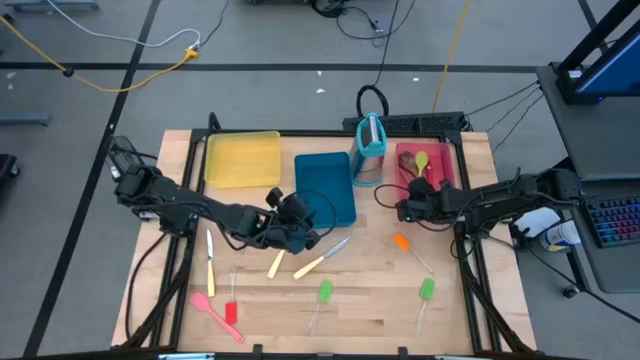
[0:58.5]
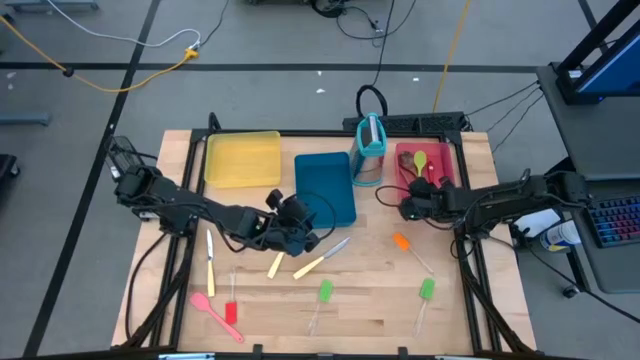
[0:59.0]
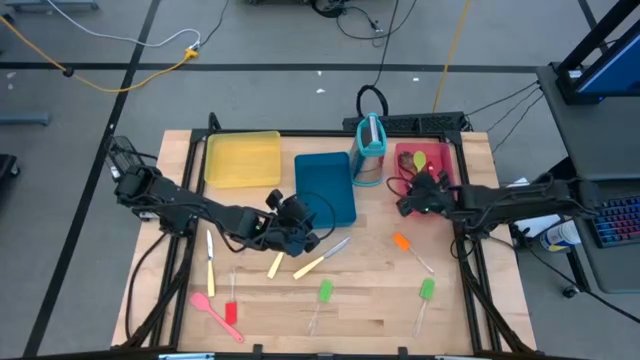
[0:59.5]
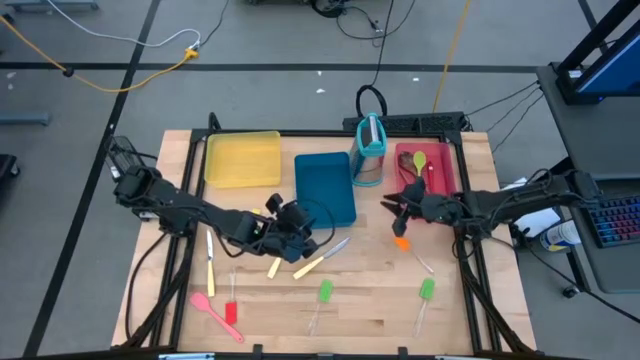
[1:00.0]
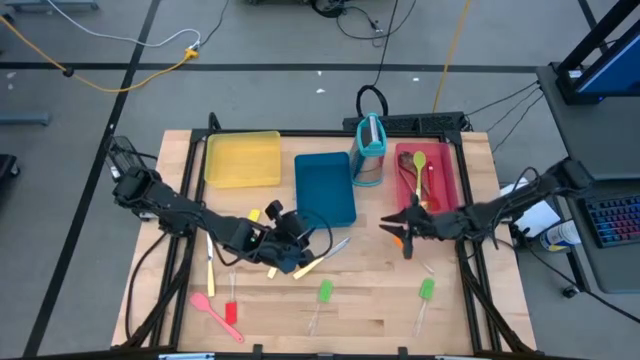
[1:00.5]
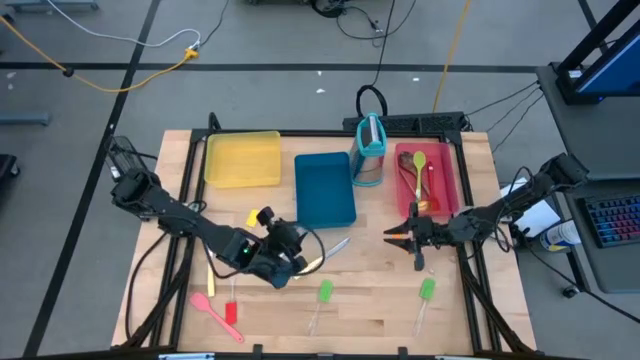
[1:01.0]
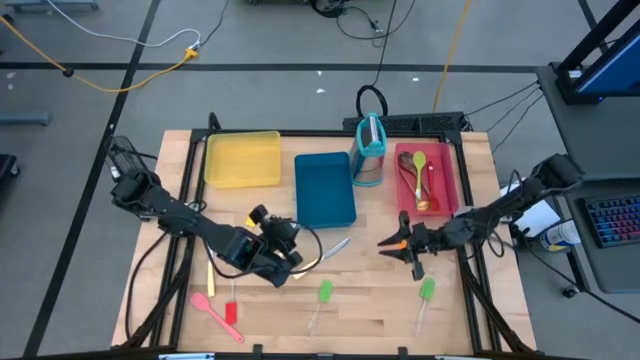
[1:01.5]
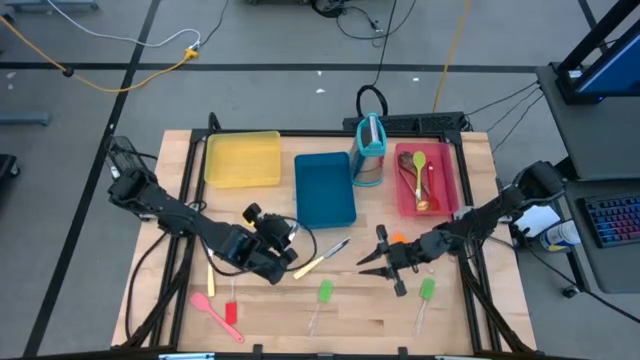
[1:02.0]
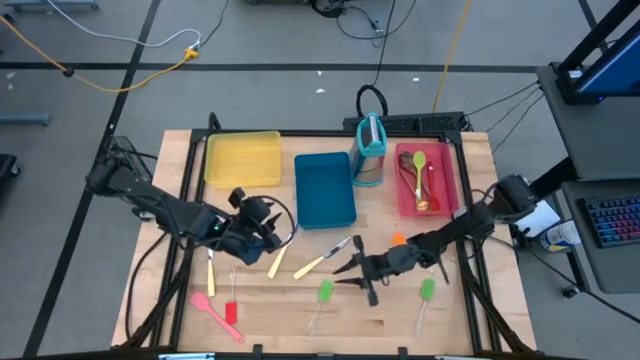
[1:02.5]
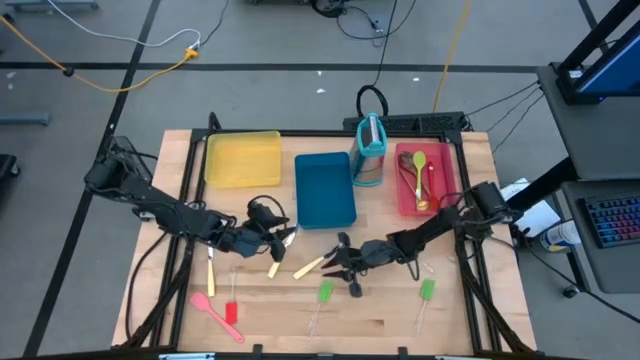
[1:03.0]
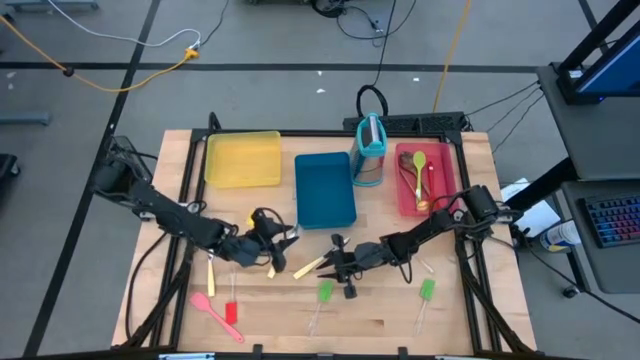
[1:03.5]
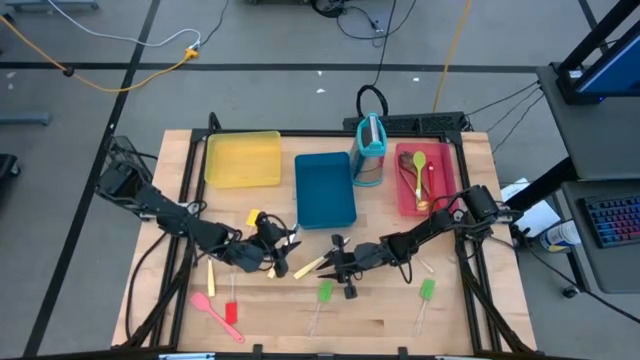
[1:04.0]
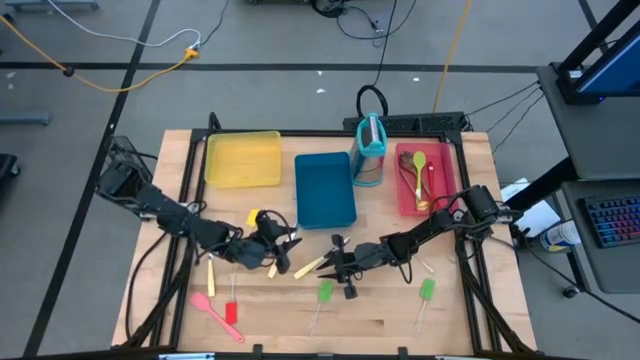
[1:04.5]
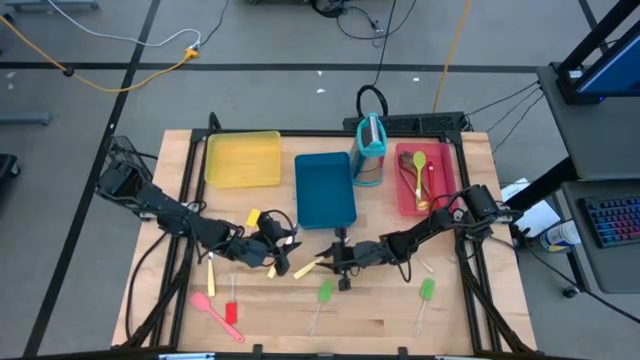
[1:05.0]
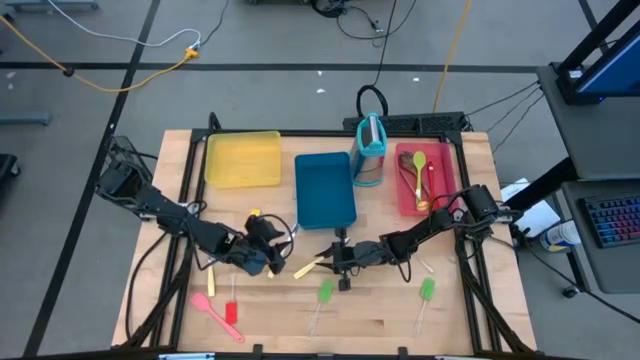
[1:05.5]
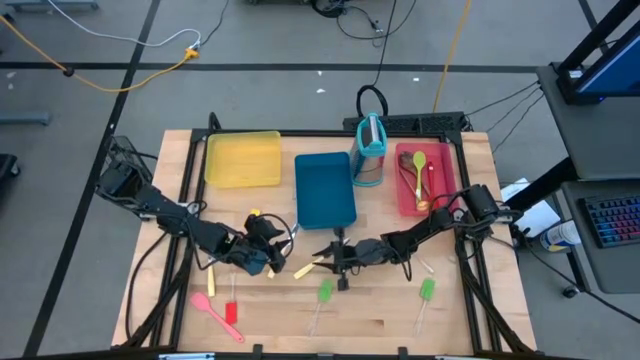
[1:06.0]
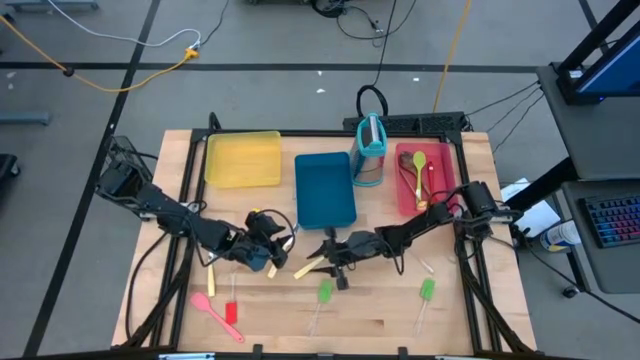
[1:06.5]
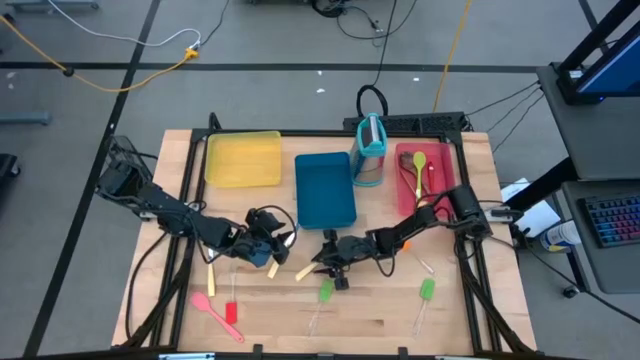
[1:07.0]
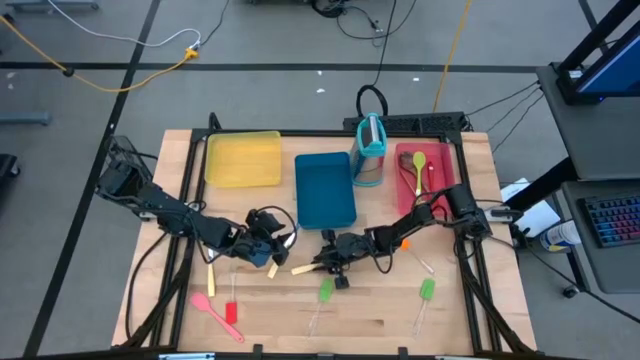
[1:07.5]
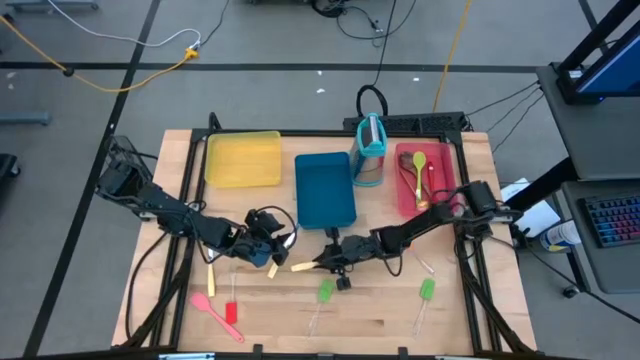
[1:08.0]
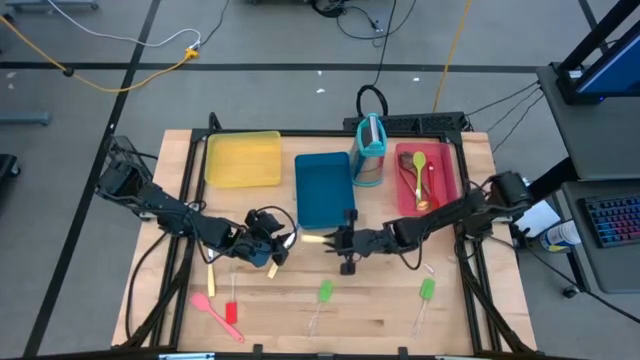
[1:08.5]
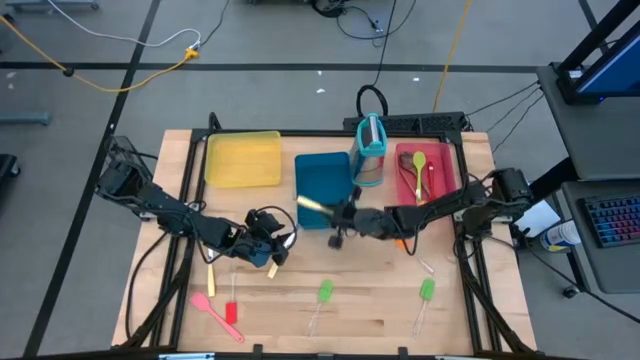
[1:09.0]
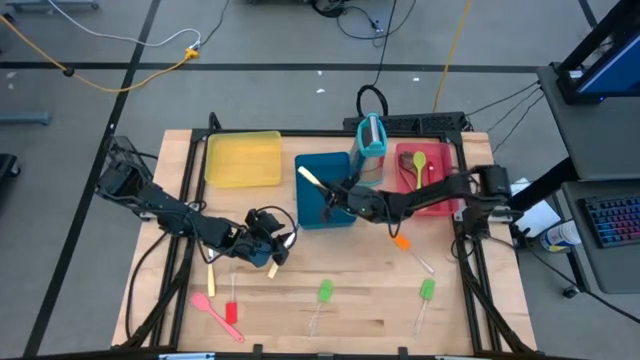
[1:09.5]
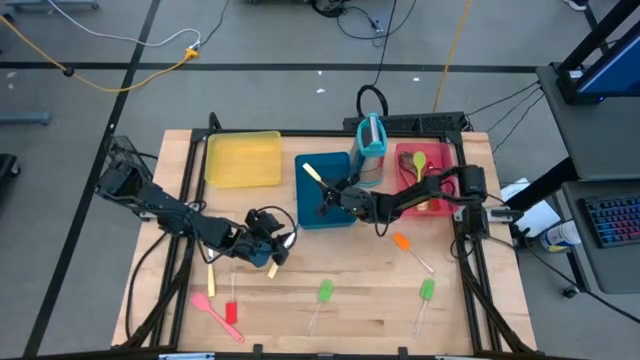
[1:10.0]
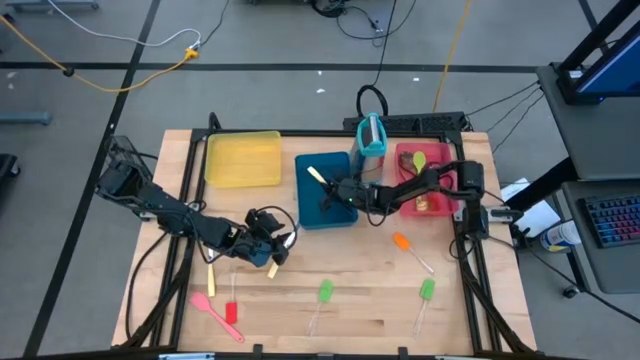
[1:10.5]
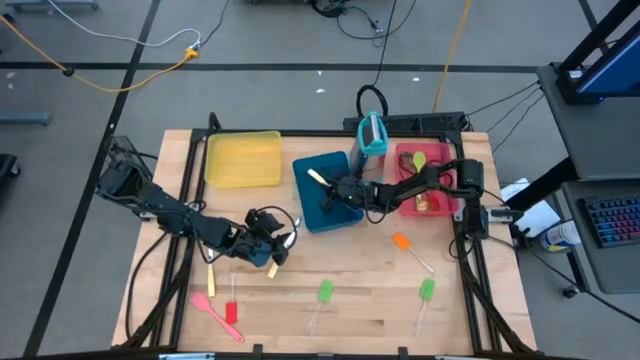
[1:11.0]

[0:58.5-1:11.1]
Task: Pick & Place Kitchen Items
Put the yellow knife into the blue bin

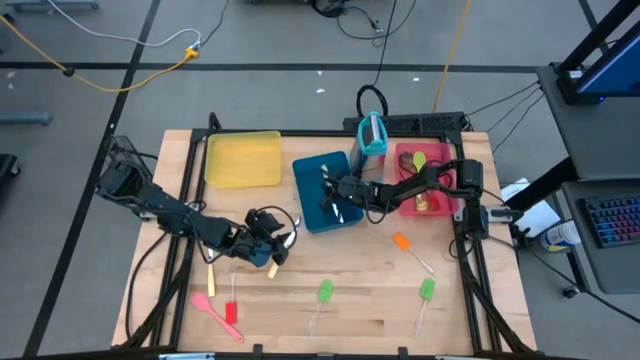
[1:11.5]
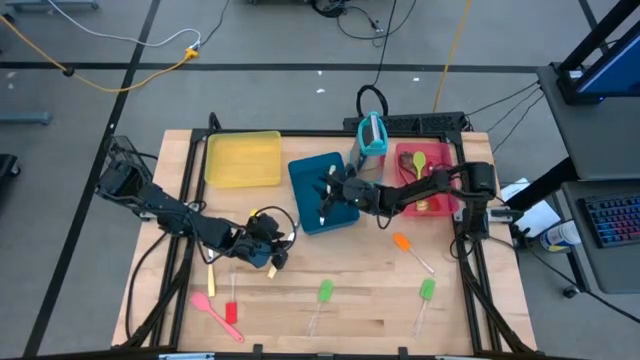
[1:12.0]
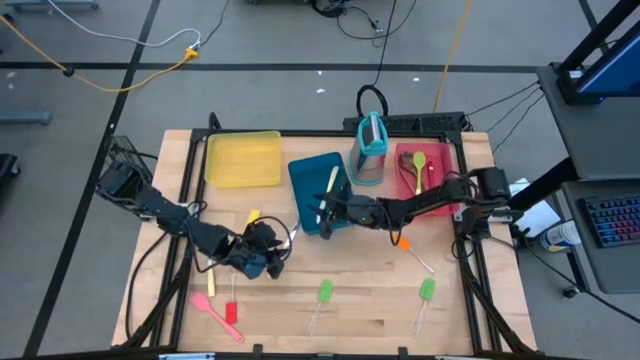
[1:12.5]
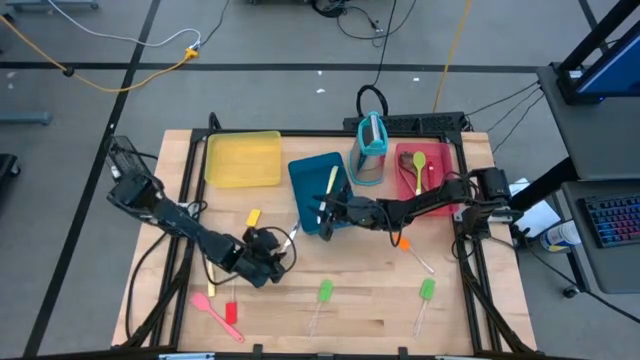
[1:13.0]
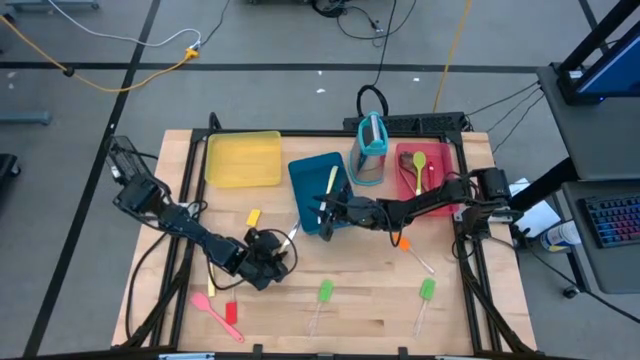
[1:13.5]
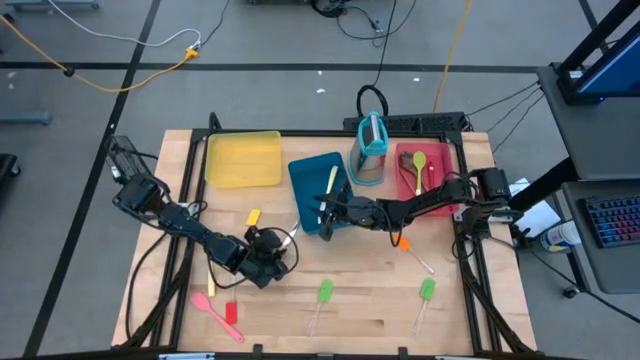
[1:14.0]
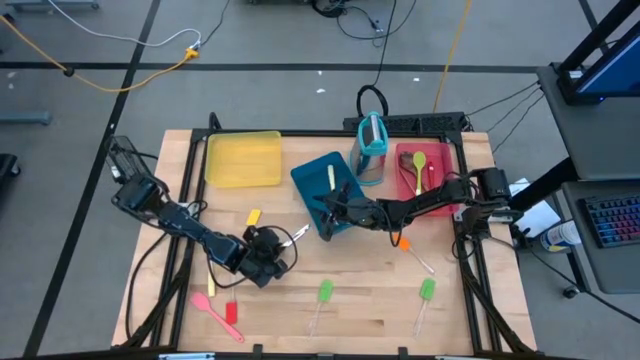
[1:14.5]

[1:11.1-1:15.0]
Put the yellow knife into the blue bin

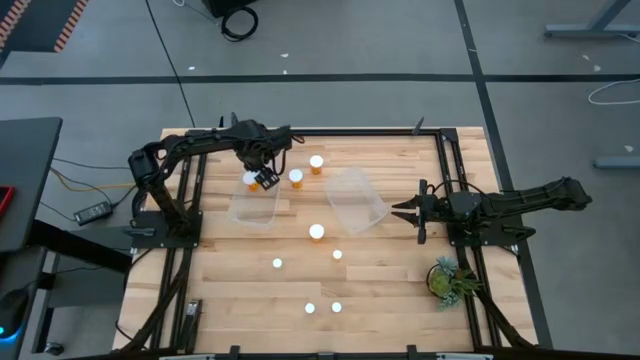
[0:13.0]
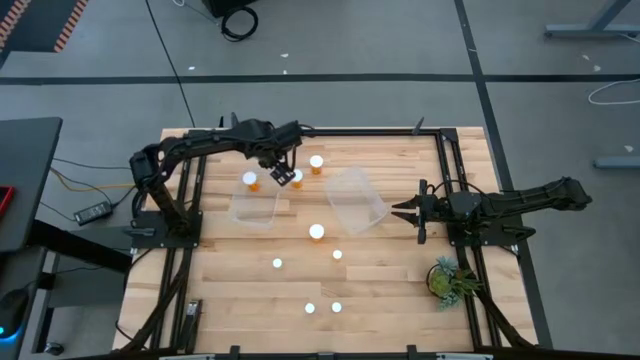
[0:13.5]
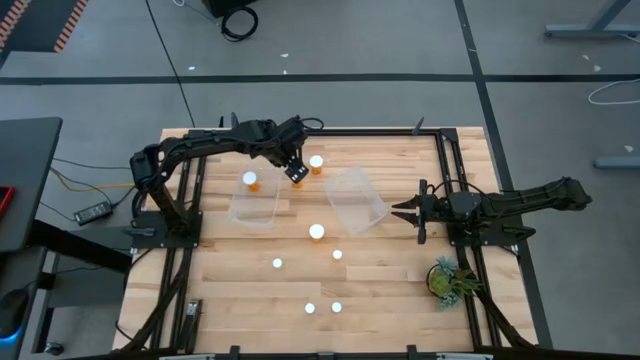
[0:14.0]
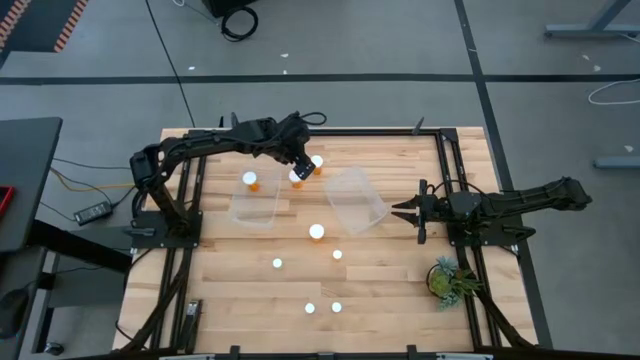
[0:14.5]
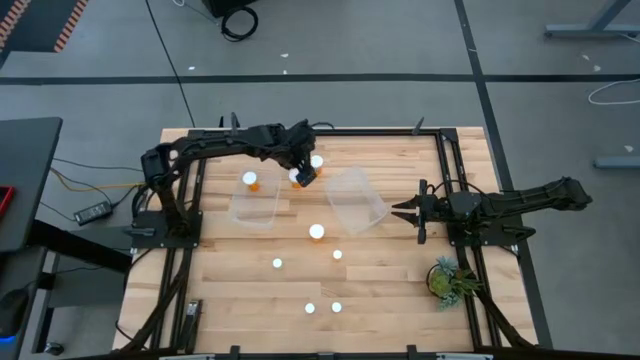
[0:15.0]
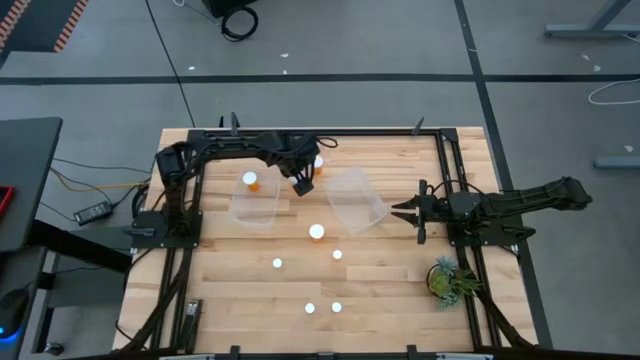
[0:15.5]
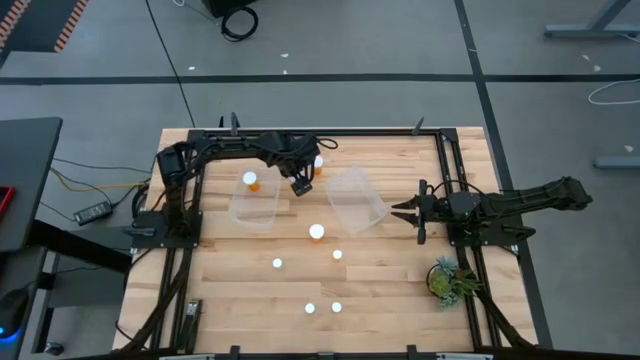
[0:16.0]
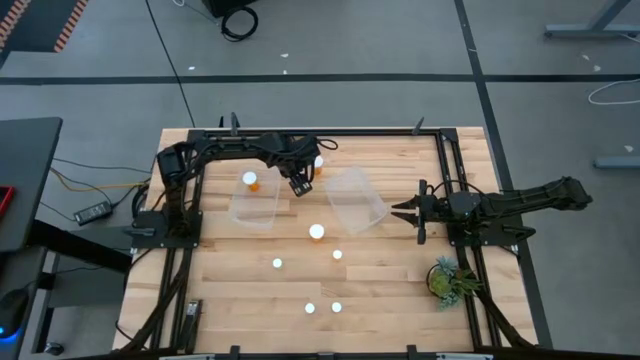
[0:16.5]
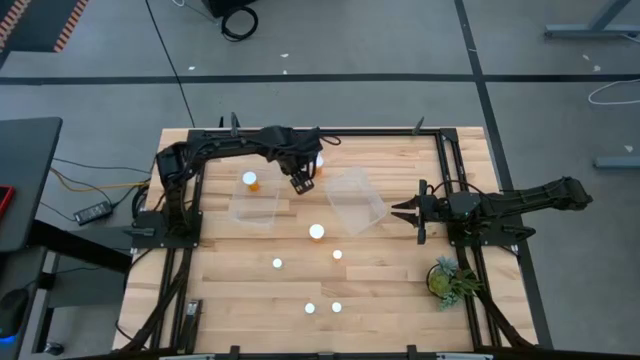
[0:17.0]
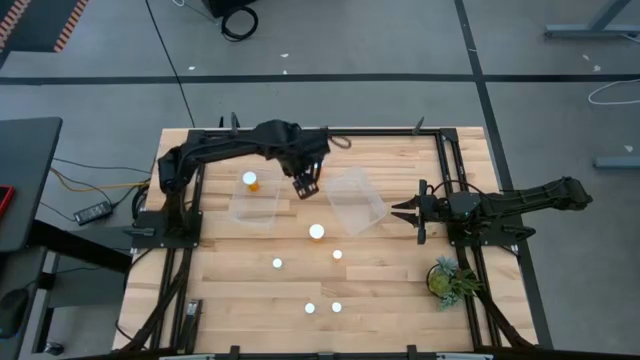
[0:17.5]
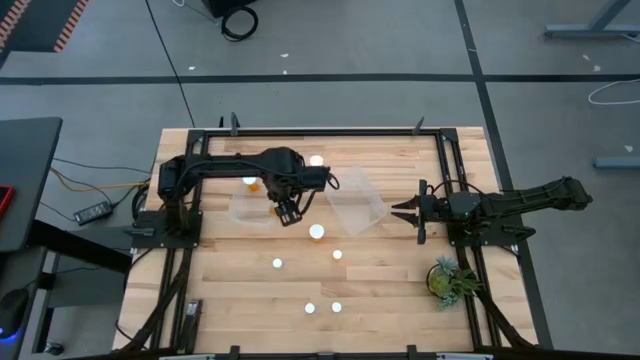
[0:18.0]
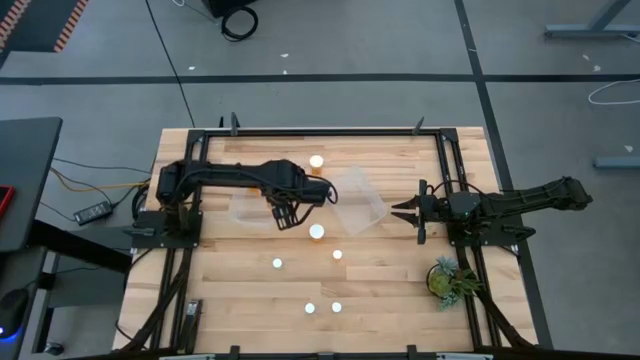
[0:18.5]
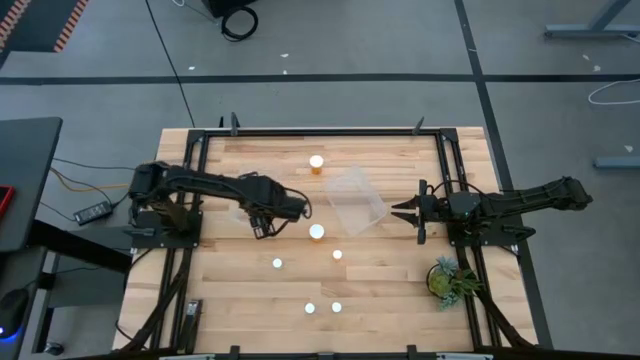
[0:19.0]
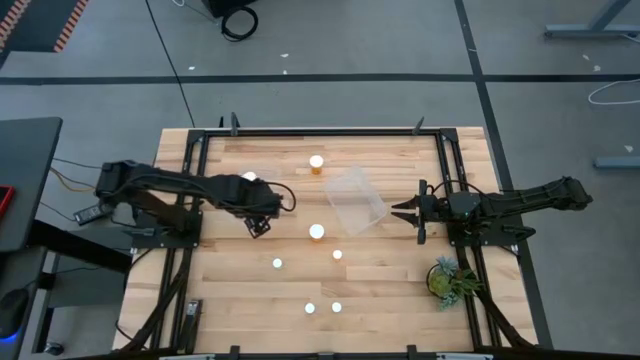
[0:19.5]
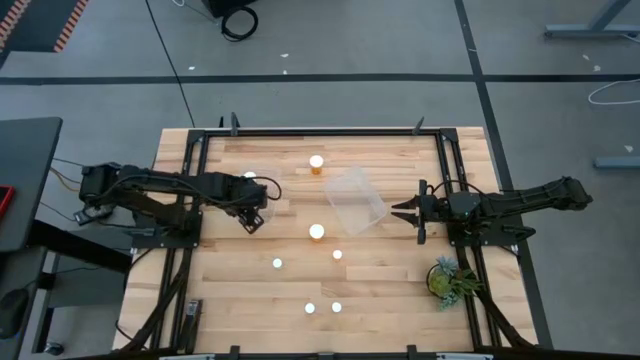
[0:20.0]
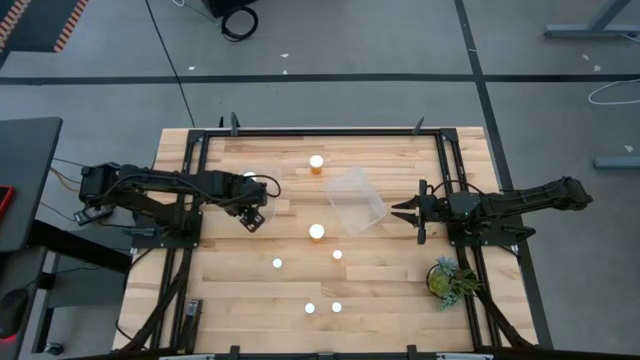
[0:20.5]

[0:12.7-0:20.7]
Task: Pick and place medicine bottles into bin by pill shape (circle, oval)
Put the large orange pill bottle into the left transparent bin
